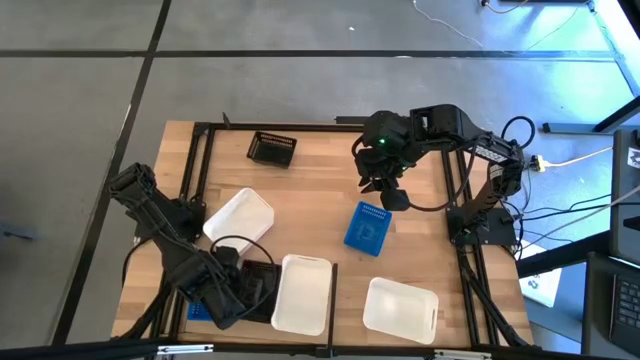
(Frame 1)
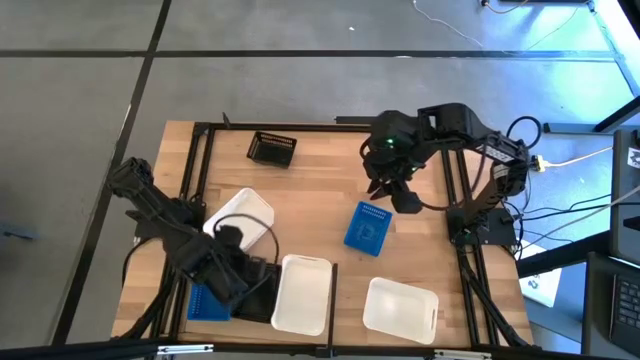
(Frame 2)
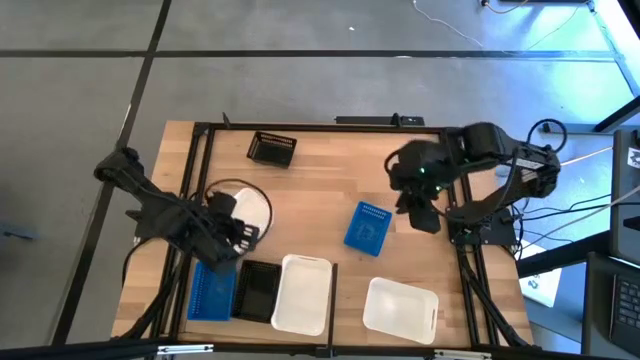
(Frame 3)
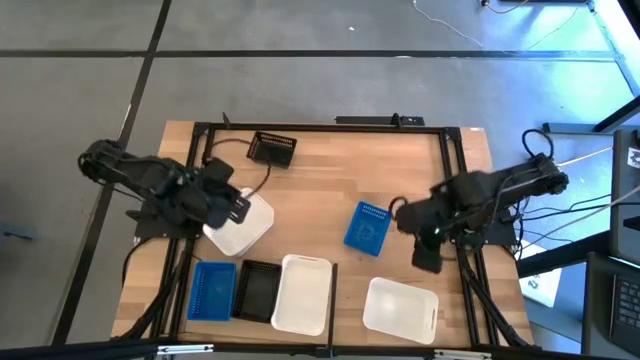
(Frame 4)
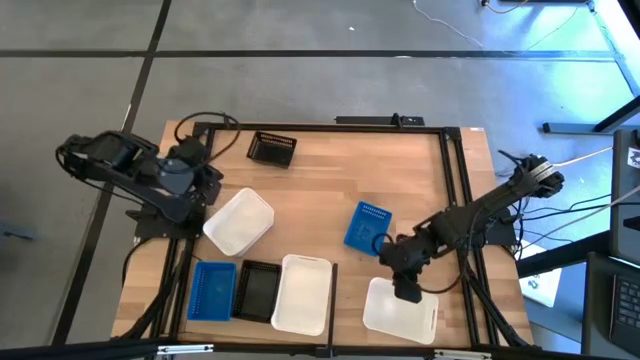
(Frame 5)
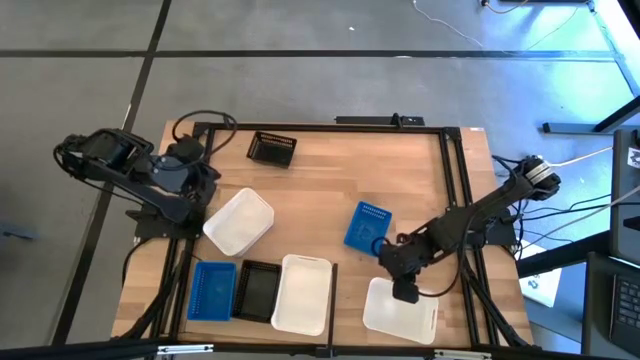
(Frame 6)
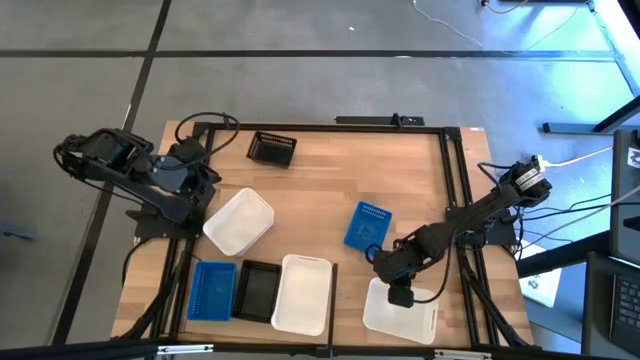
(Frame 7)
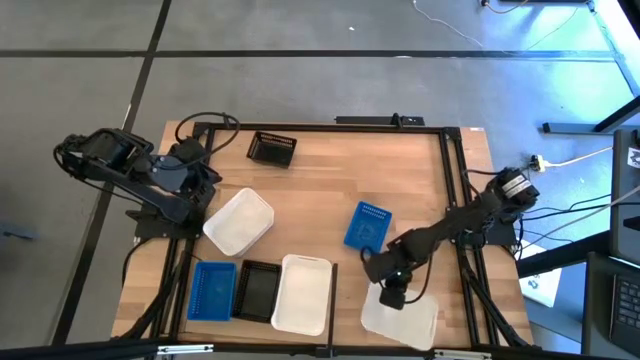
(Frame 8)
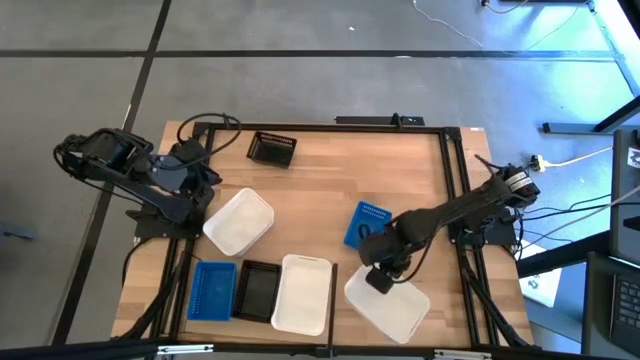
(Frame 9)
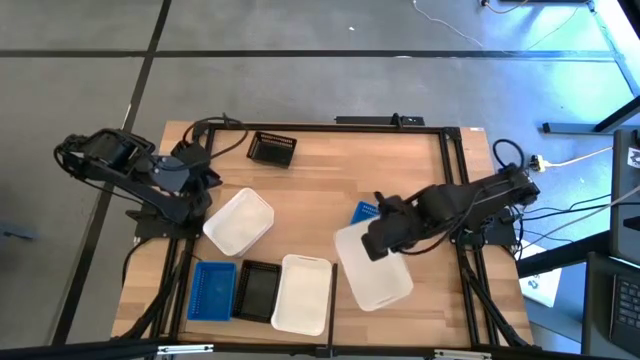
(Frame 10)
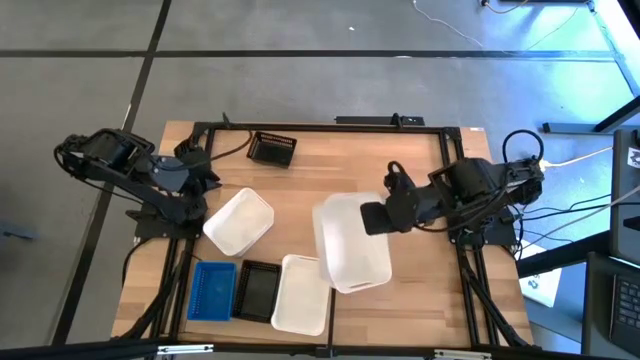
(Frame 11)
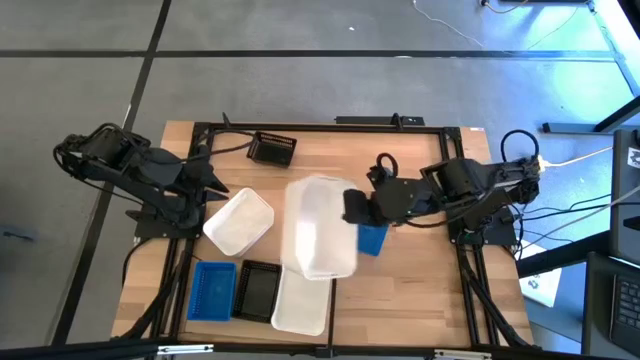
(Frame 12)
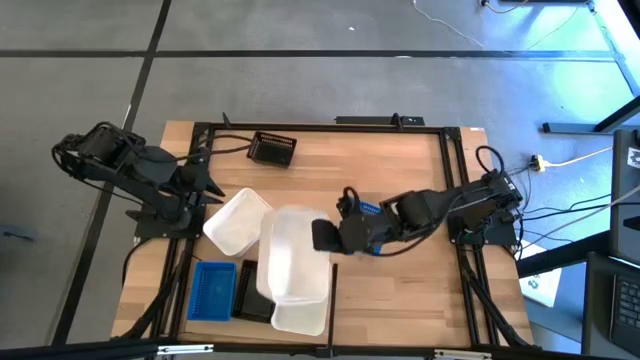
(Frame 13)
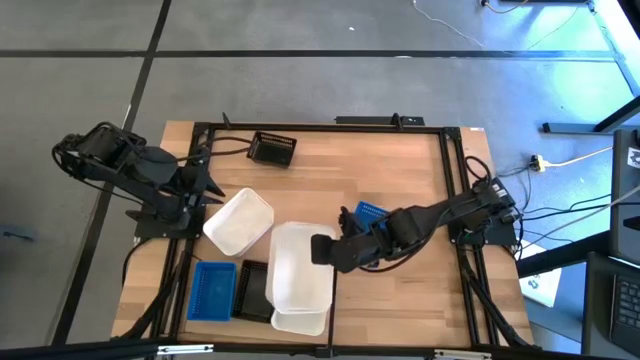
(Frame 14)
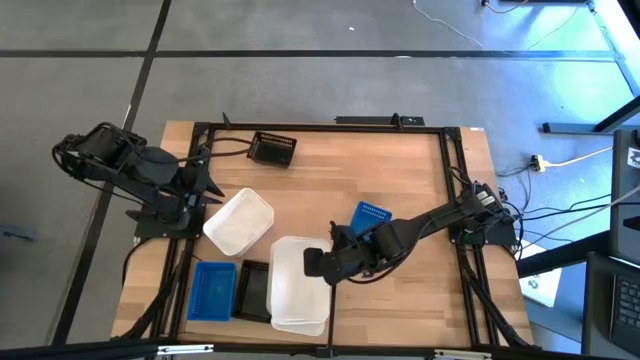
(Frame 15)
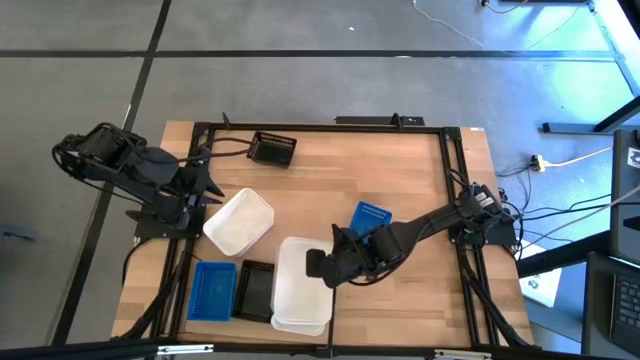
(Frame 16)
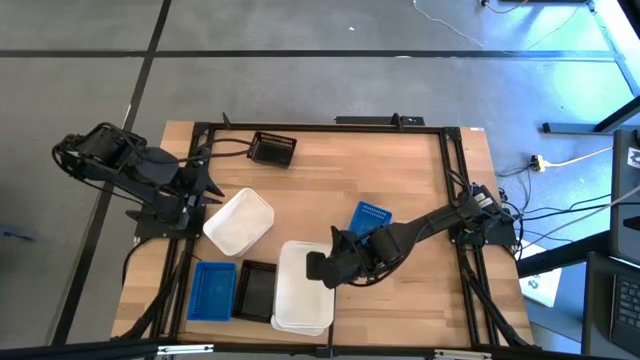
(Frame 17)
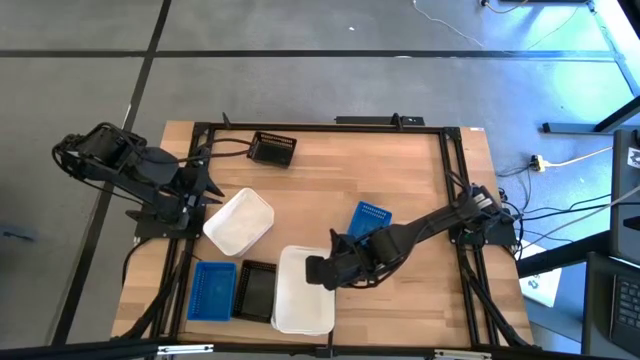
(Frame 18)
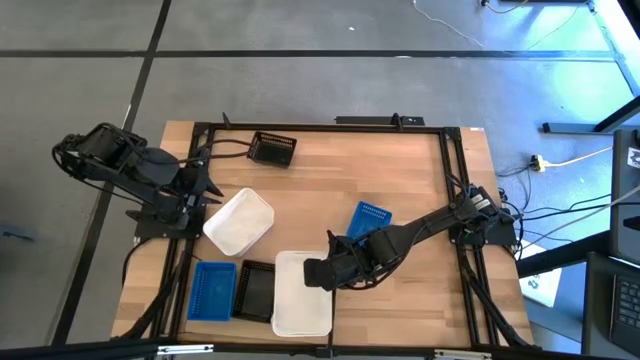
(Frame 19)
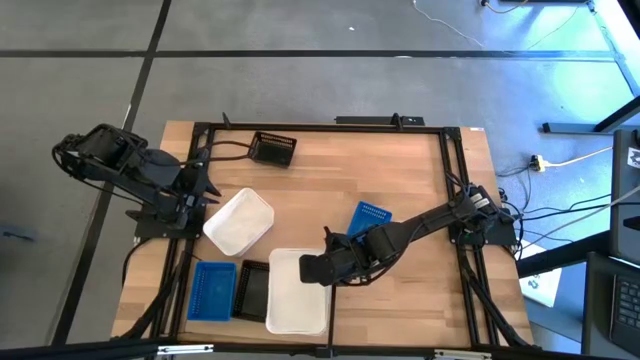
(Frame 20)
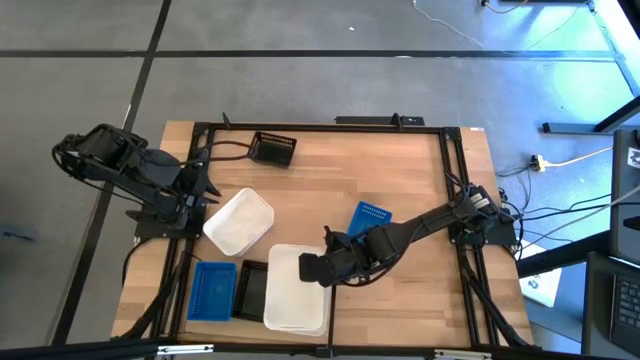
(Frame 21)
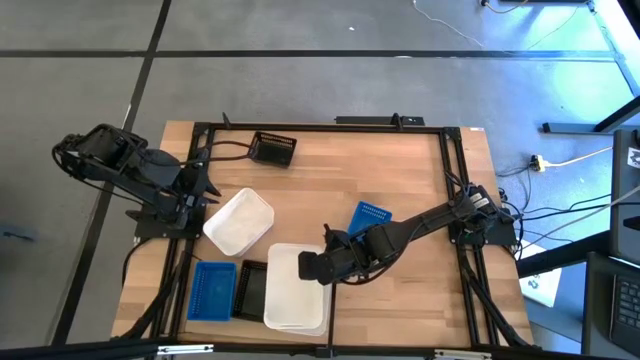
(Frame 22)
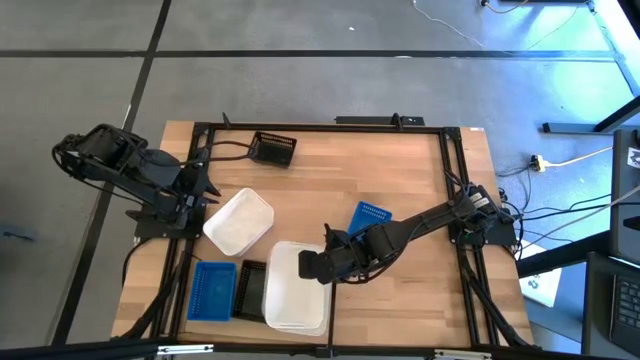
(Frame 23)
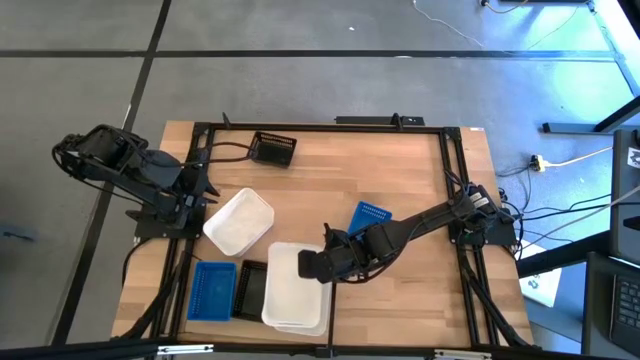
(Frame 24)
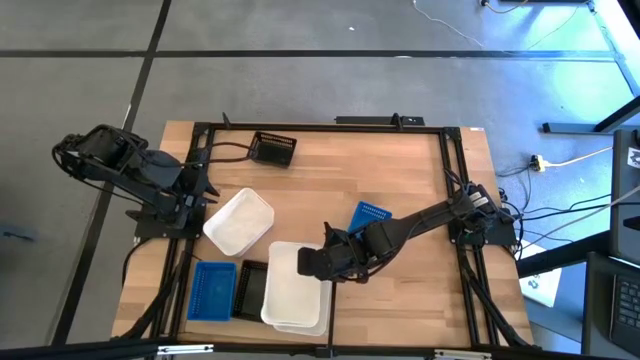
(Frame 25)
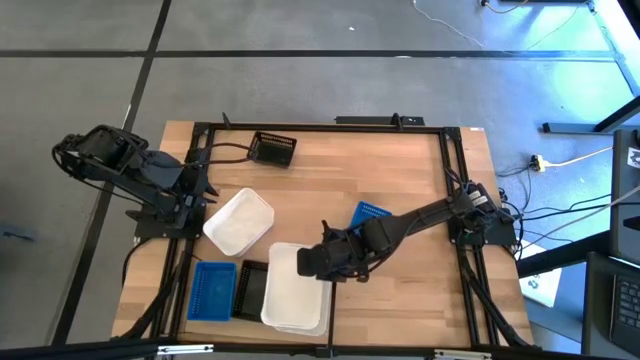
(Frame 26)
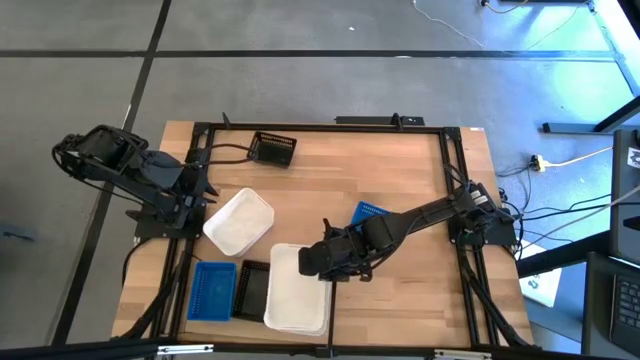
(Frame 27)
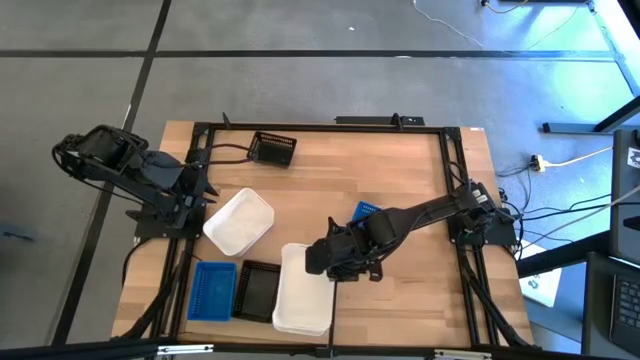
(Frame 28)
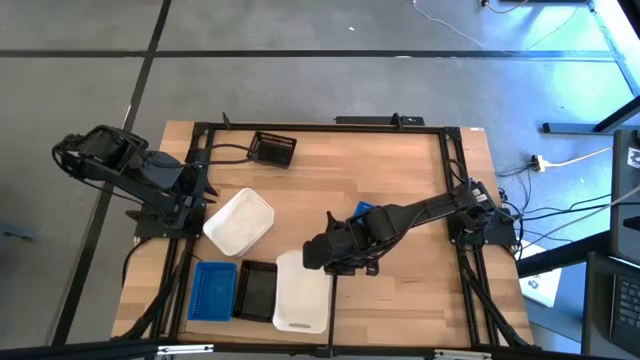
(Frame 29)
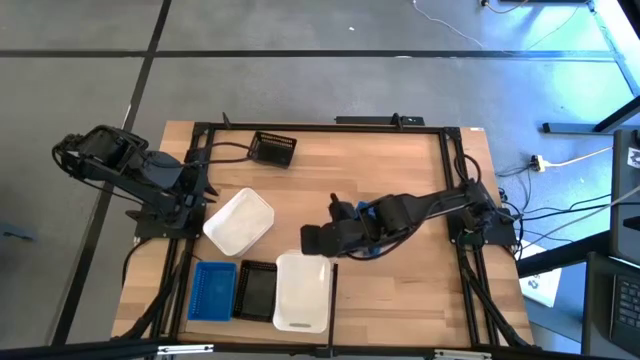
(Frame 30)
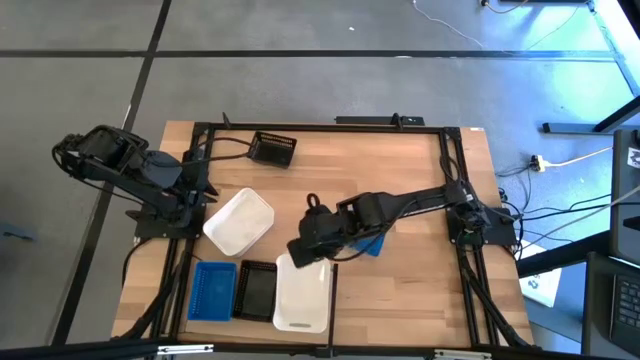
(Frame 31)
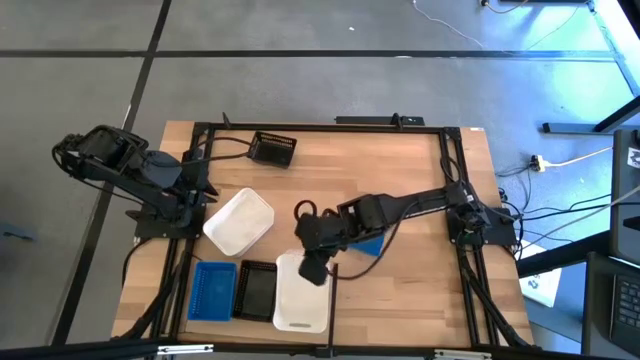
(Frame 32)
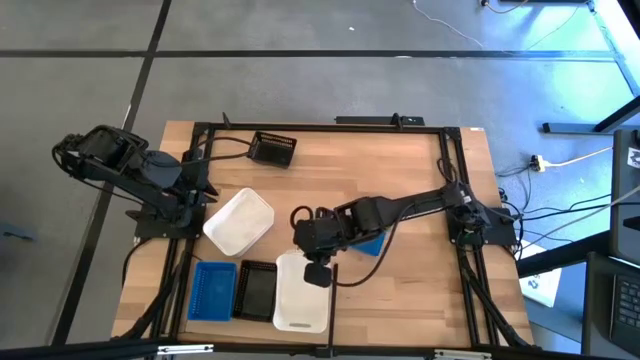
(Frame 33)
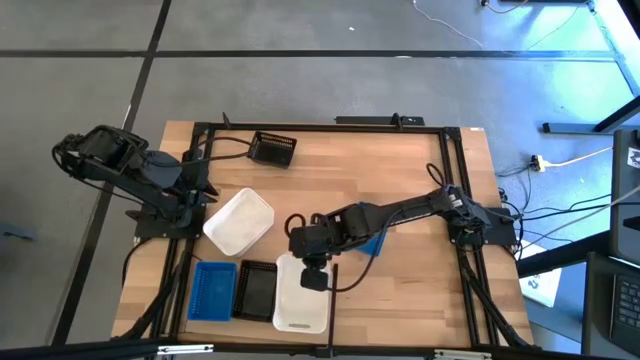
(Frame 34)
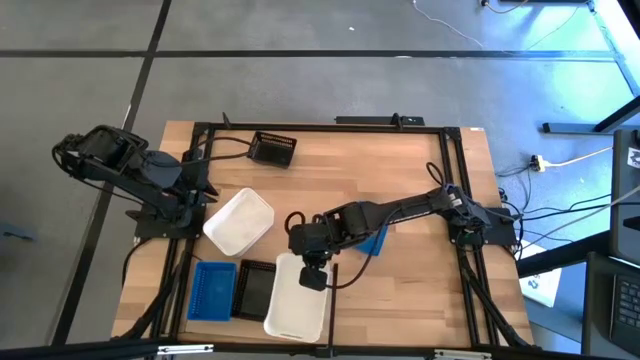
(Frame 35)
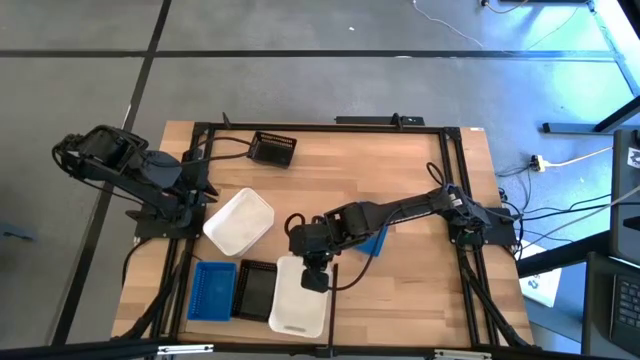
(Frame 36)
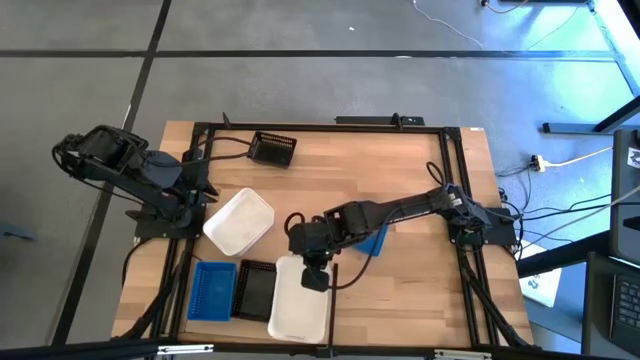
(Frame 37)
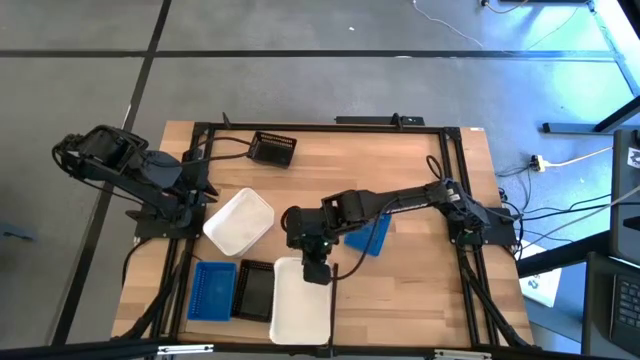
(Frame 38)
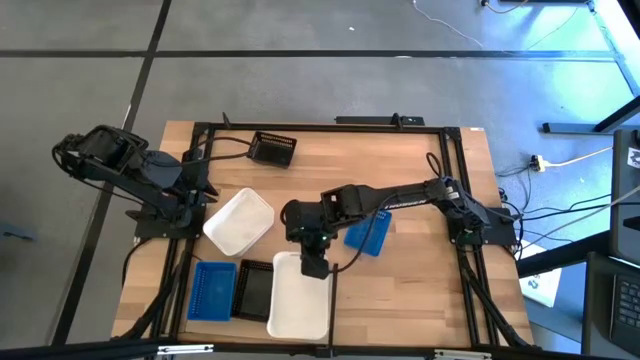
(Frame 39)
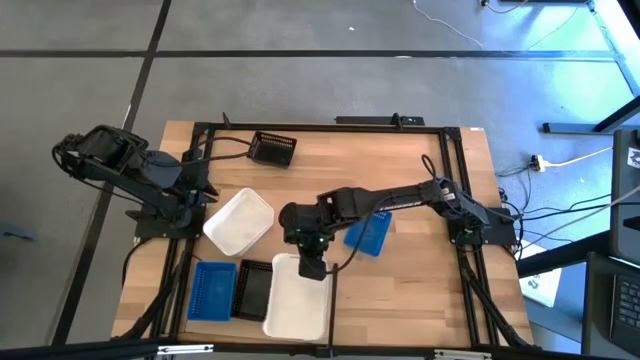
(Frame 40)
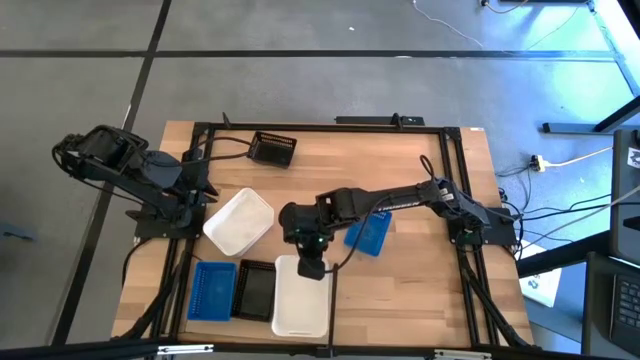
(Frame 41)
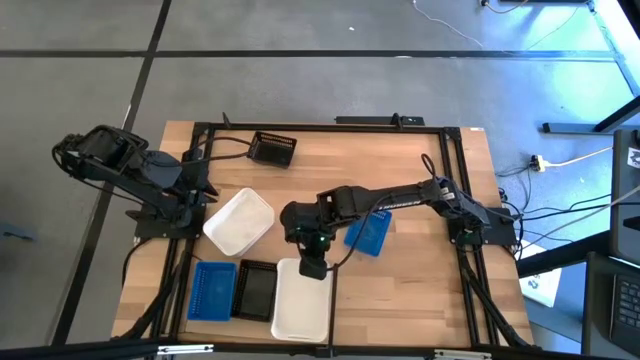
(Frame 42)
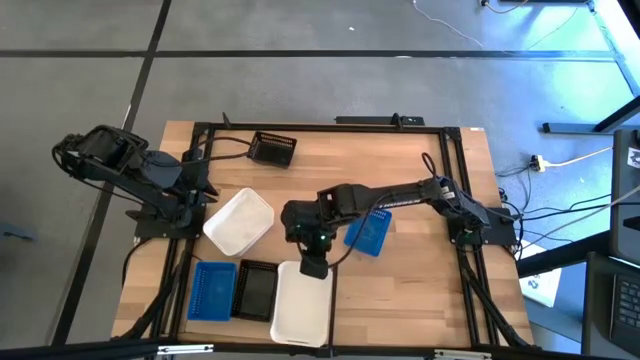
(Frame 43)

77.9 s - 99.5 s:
Task: Stack baskets on shelf by color
Stack the bottom white bin on top of the white bin on the shelf
